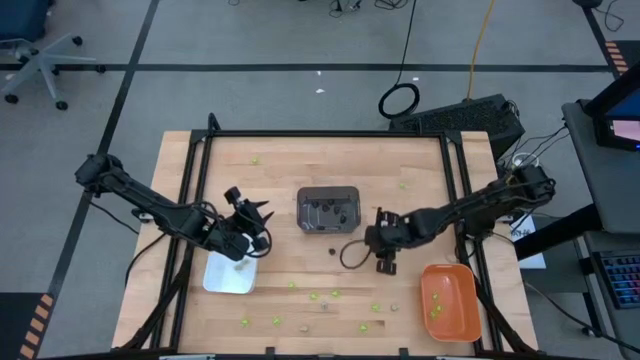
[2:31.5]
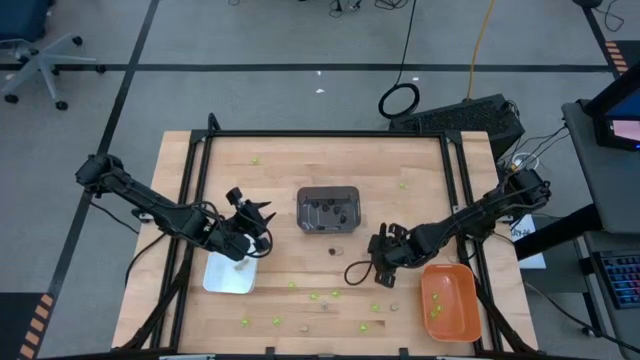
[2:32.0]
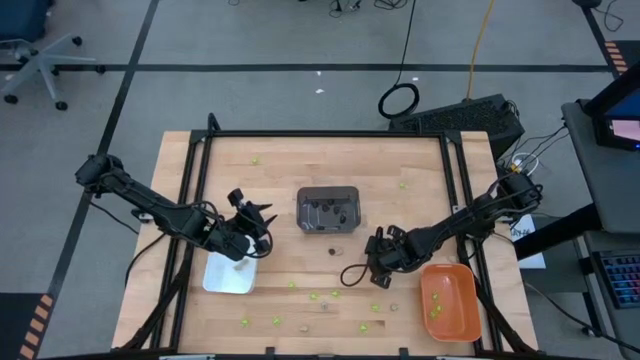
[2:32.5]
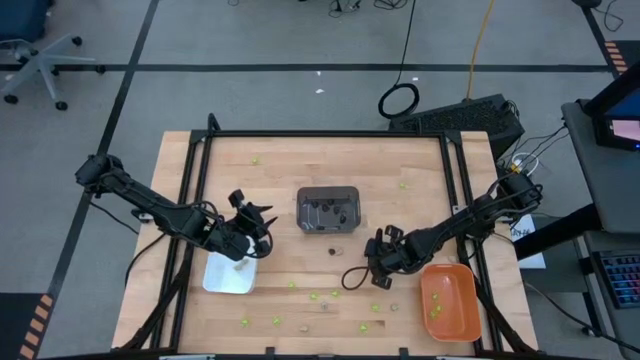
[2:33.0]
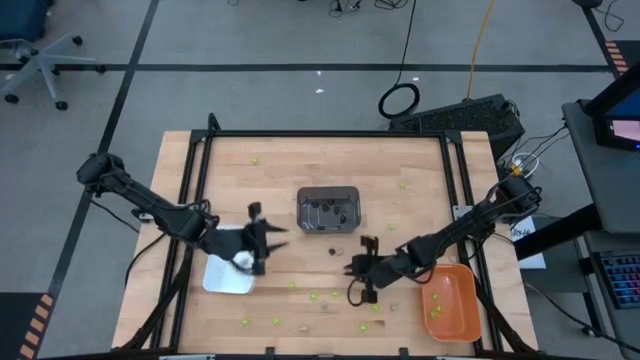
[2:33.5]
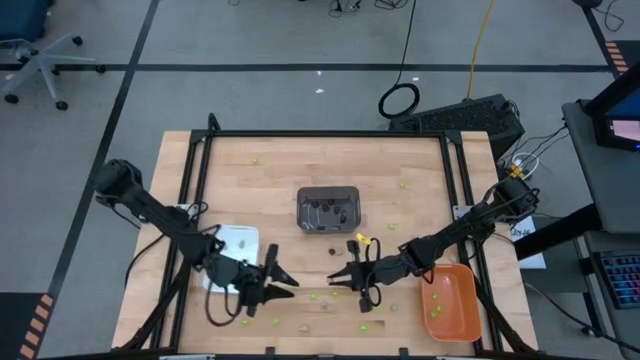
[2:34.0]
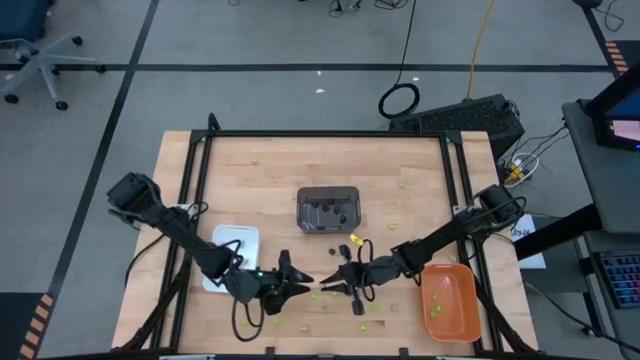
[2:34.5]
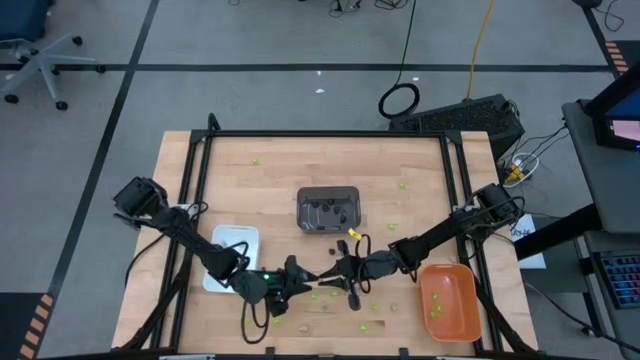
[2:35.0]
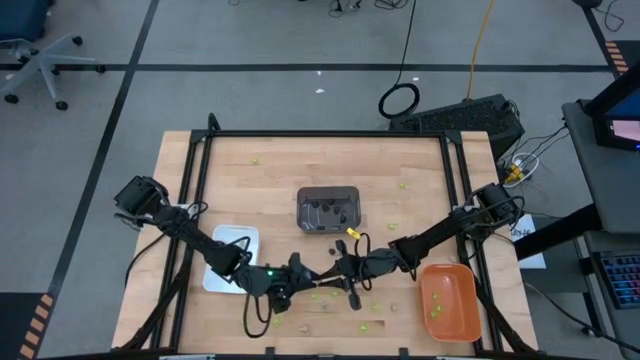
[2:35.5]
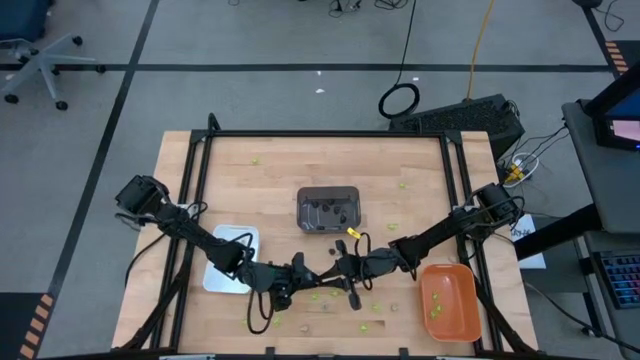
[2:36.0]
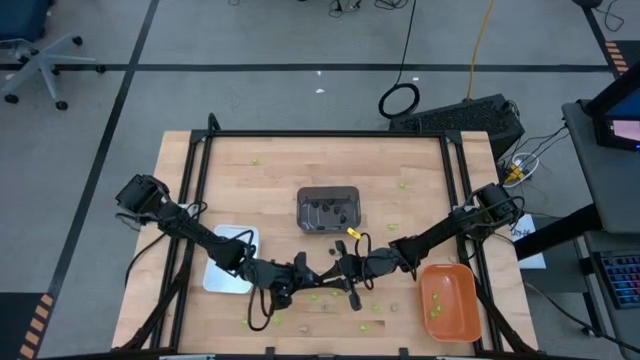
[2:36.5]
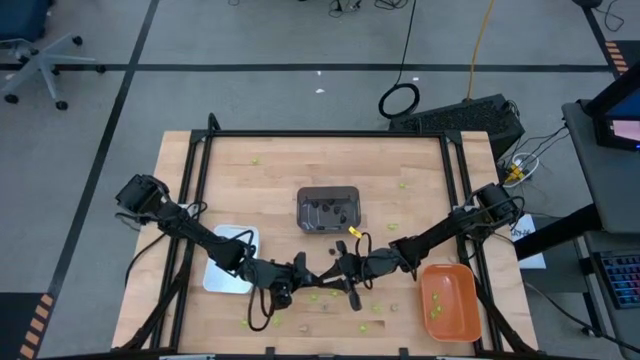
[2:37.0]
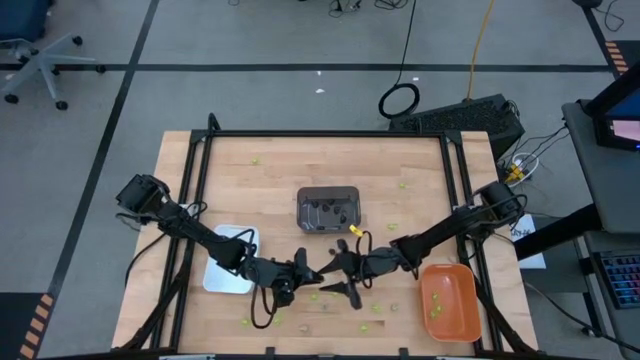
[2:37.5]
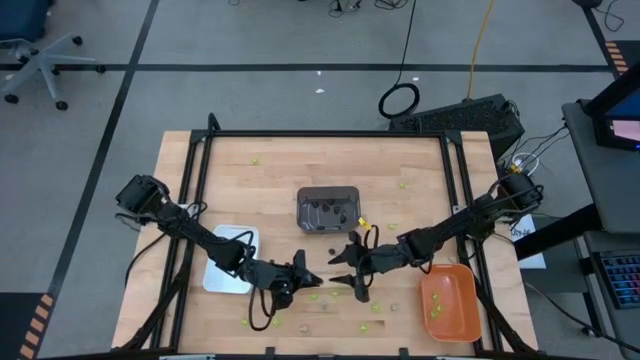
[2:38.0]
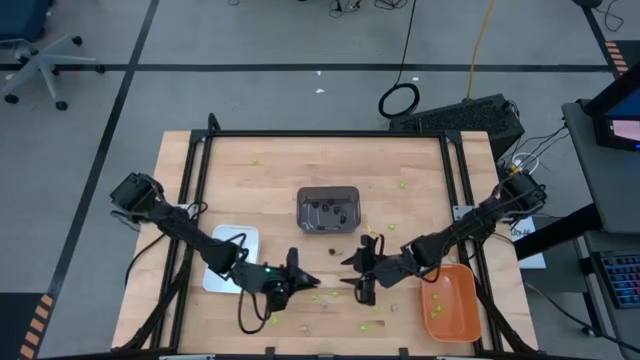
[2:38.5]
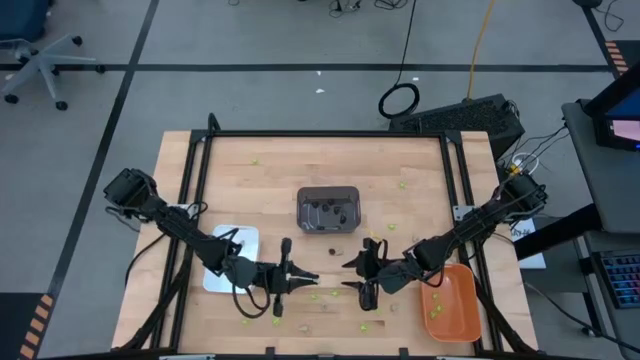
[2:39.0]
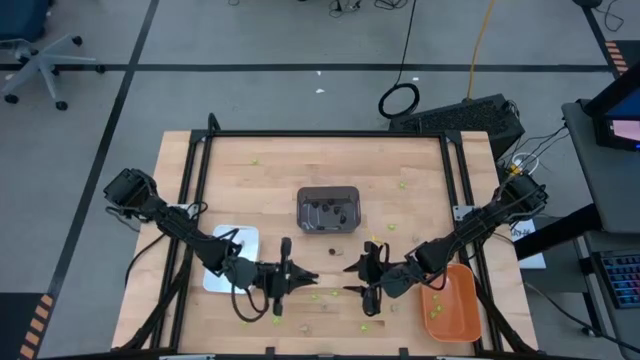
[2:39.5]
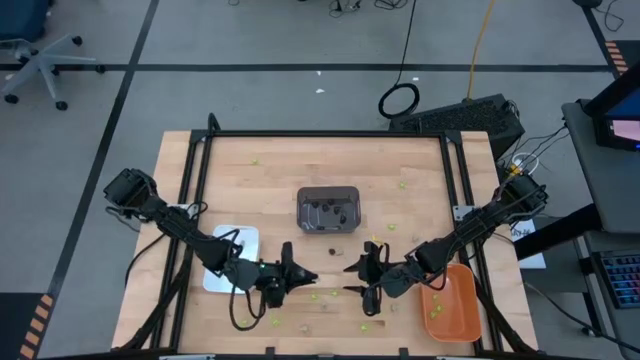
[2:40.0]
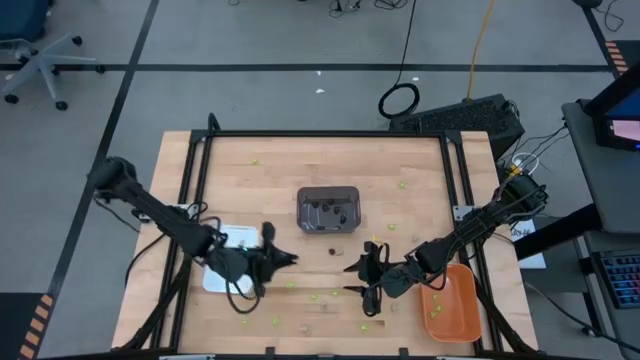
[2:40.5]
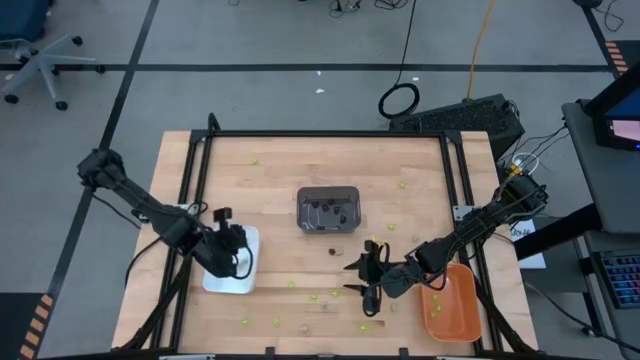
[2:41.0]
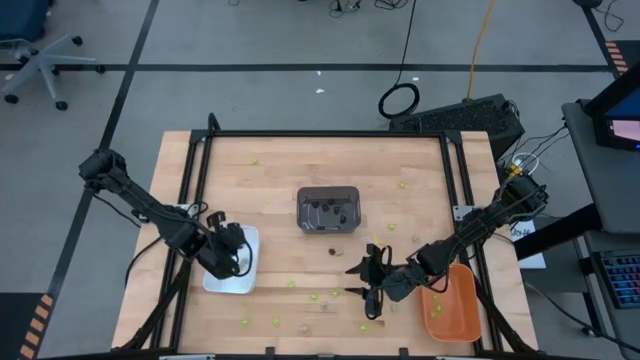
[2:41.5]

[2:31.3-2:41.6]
Task: Sort Halloween decoration
Put the white skull toy into the white bin

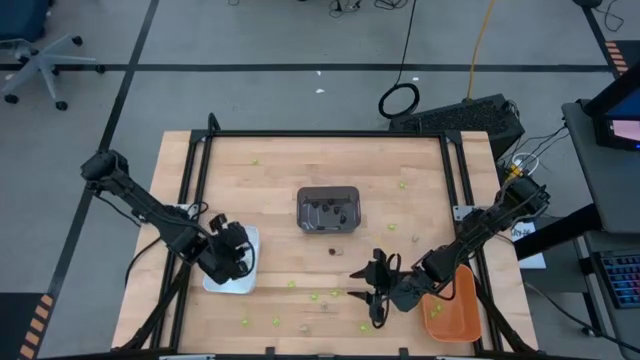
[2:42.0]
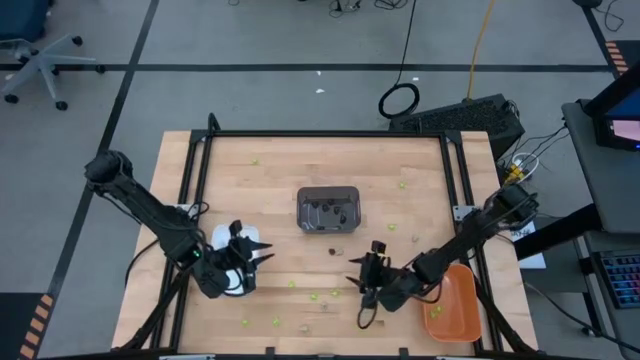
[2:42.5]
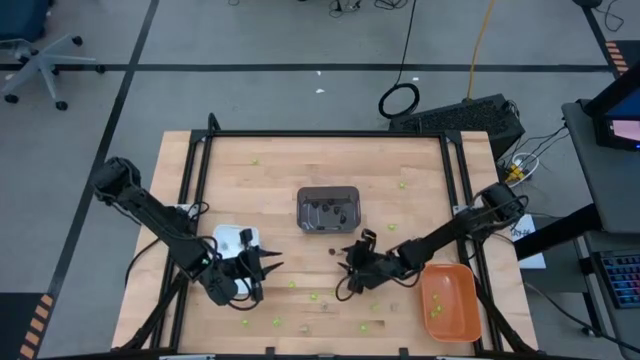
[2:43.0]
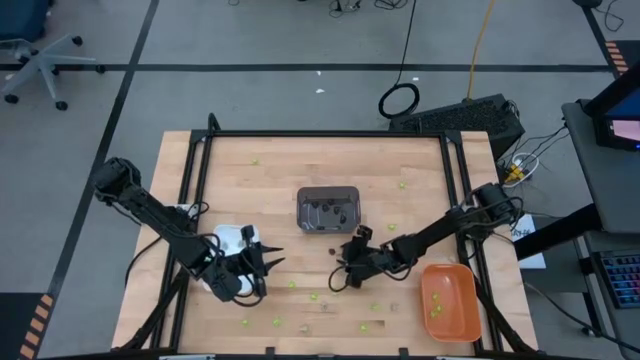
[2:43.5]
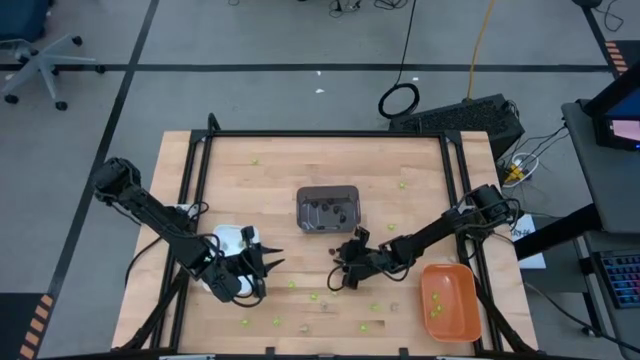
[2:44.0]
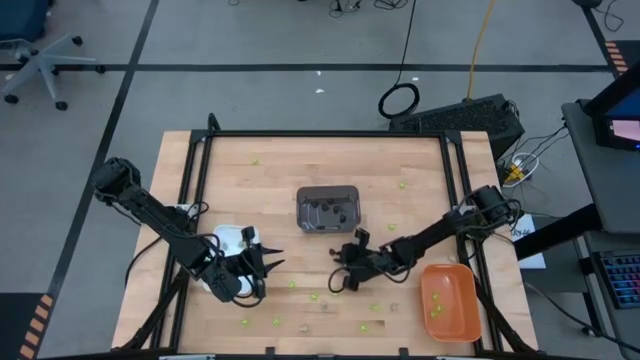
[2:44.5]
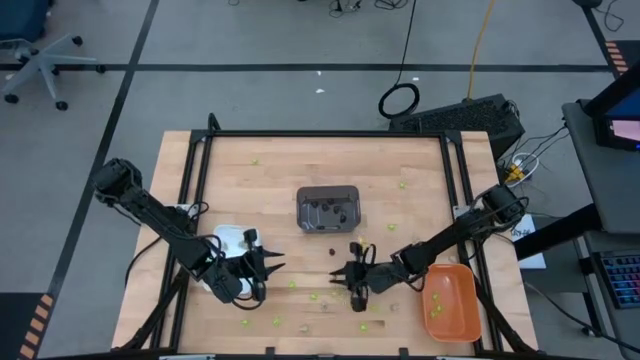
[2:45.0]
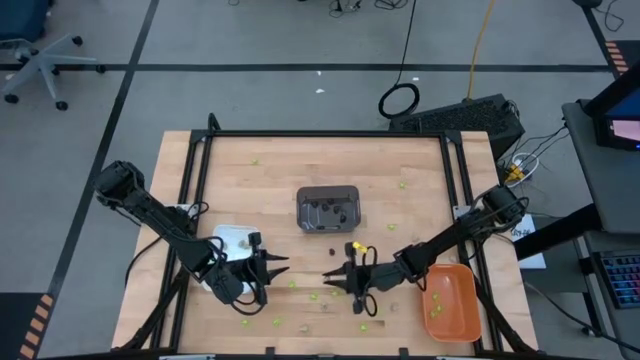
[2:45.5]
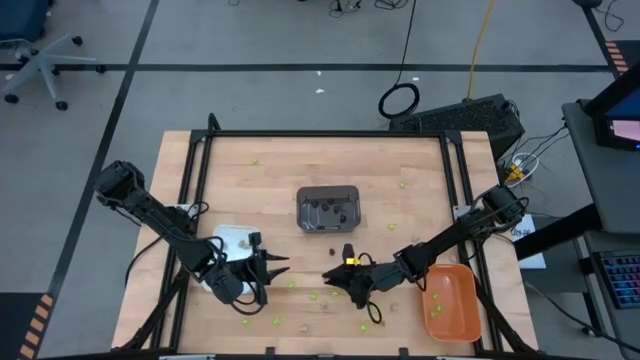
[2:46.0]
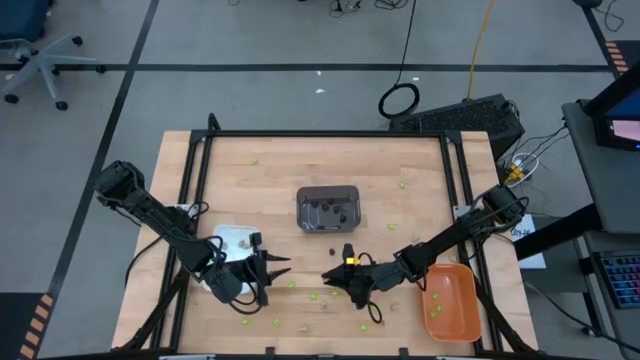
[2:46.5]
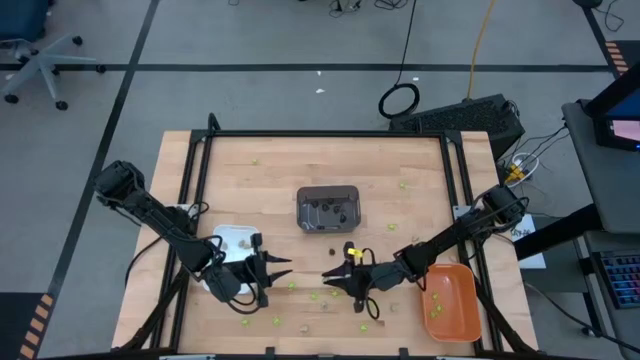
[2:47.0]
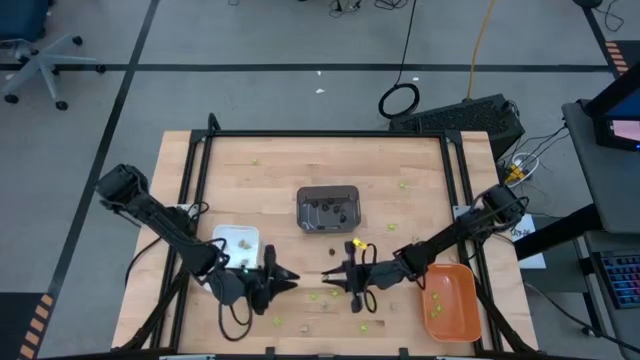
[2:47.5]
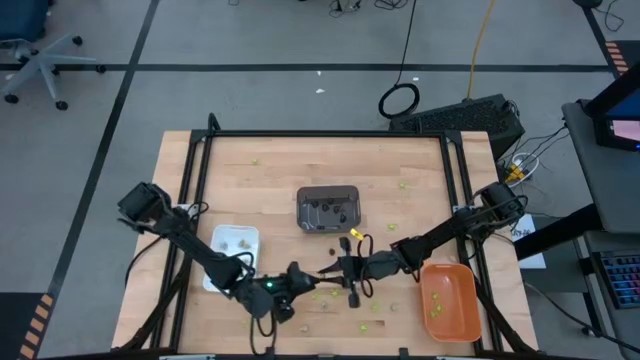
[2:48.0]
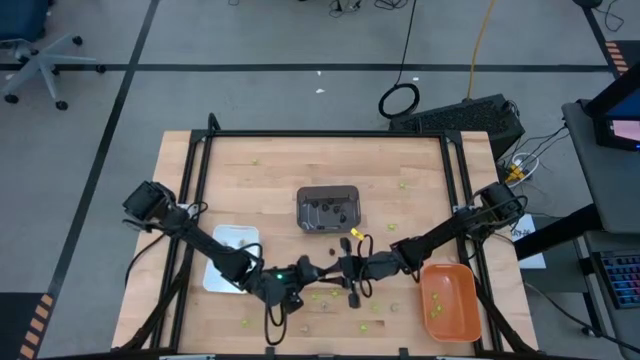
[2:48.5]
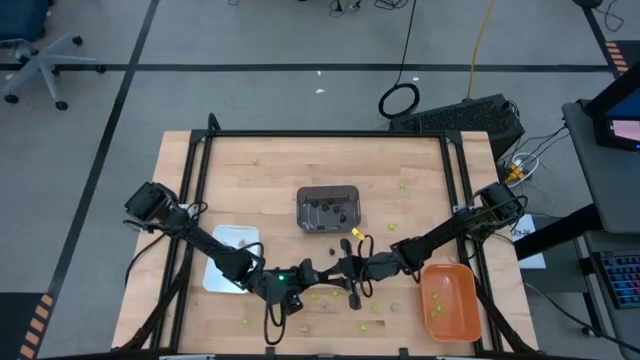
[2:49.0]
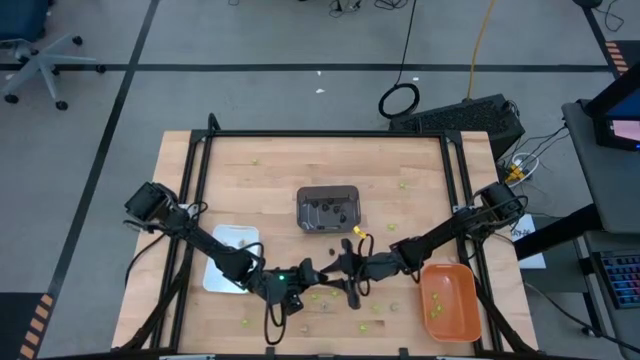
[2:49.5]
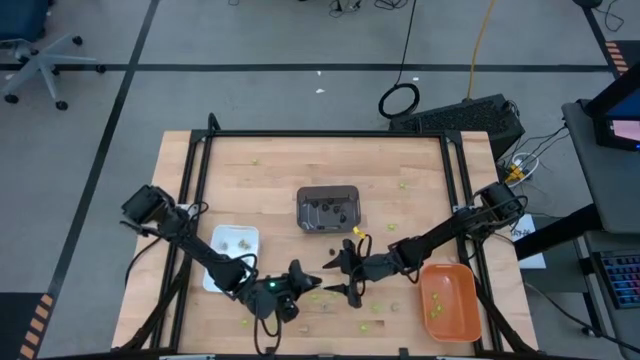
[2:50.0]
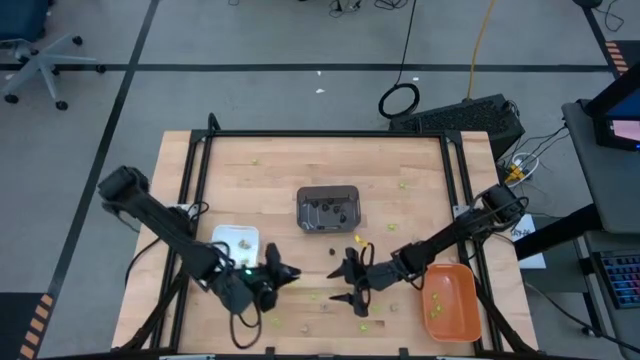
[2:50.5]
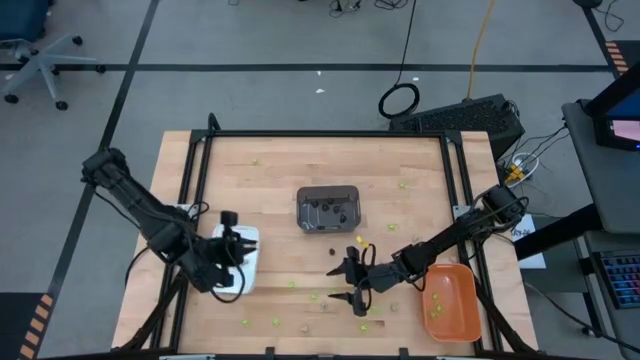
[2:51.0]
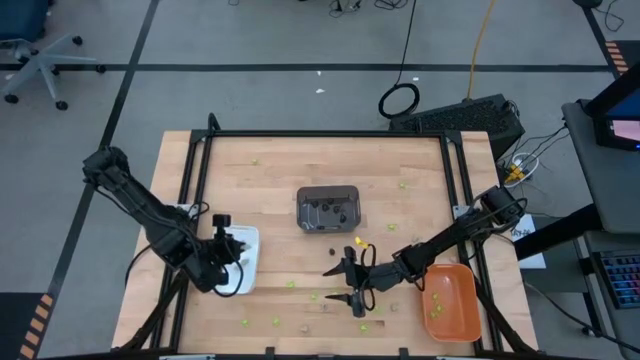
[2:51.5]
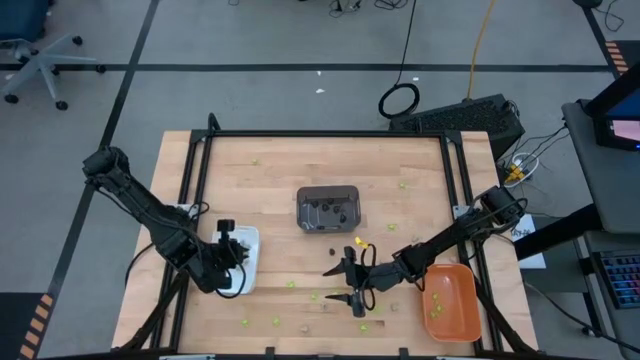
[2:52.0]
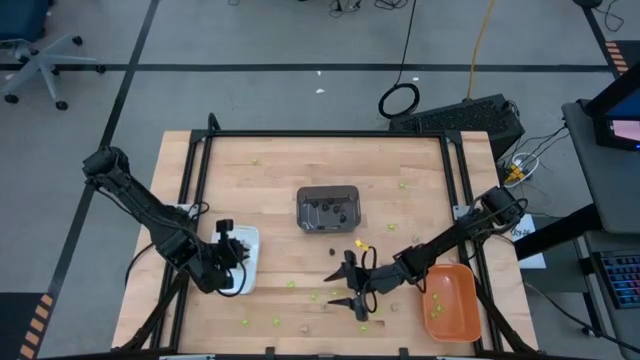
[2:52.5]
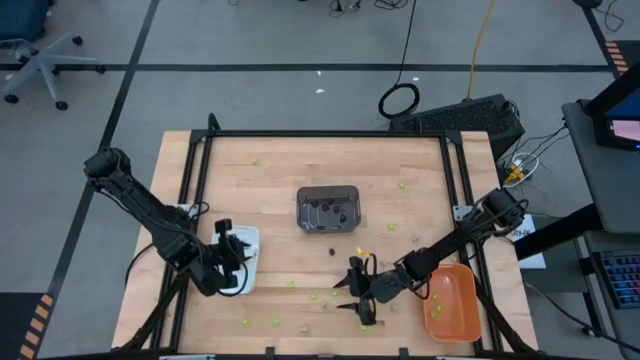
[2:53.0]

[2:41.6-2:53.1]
Put the white skull toy into the white bin
